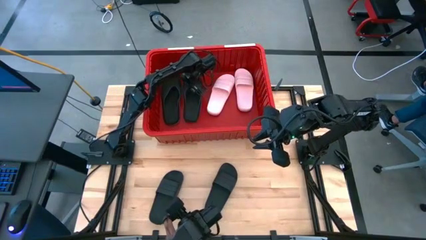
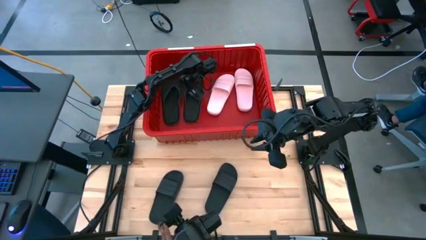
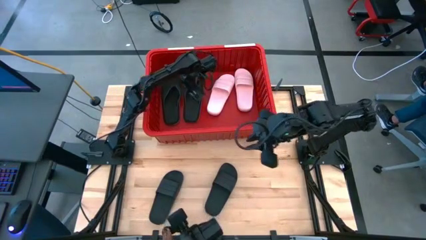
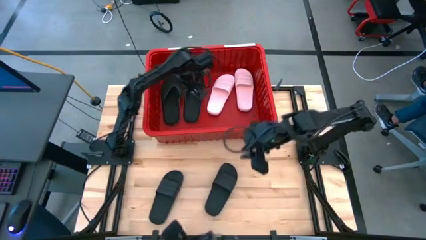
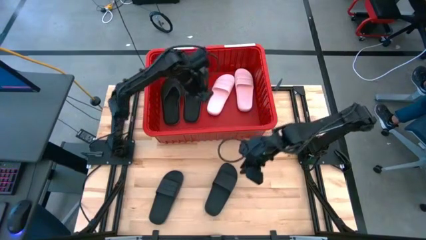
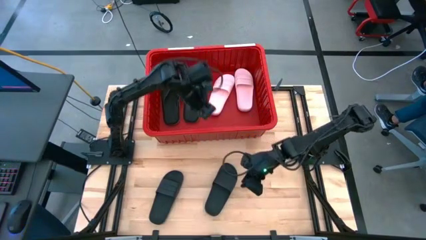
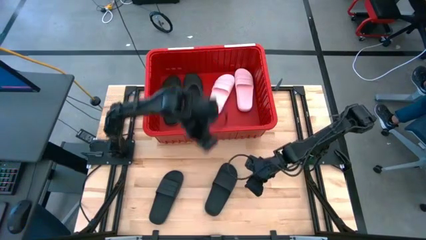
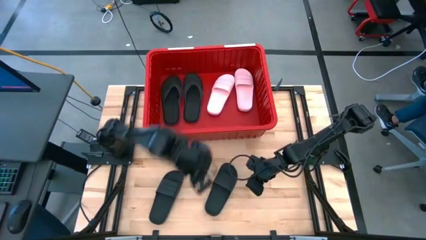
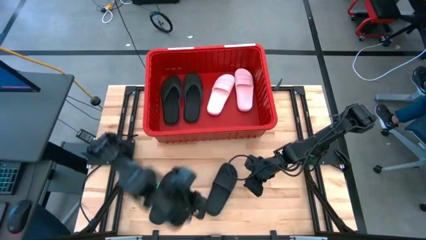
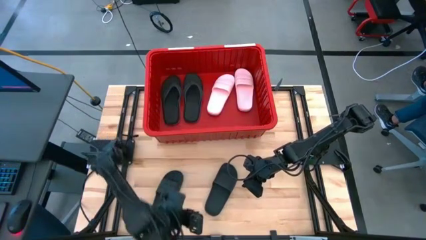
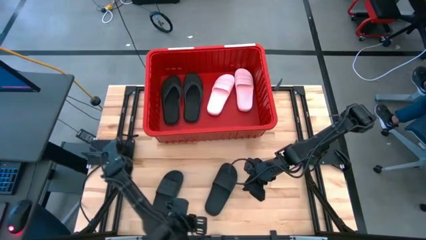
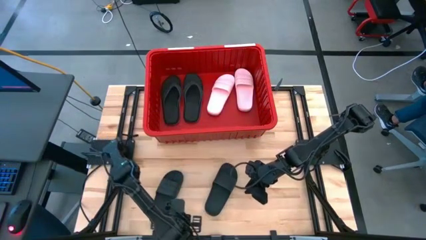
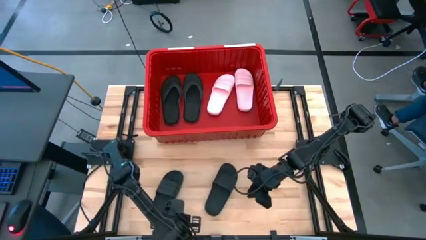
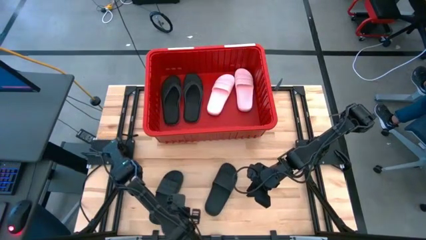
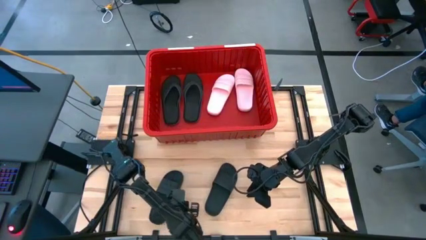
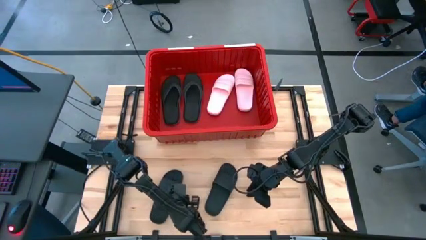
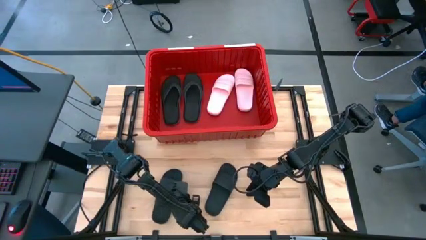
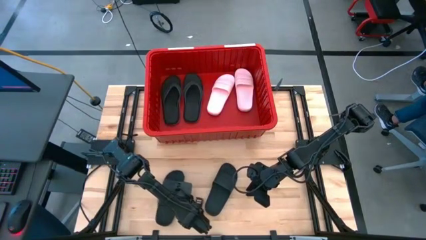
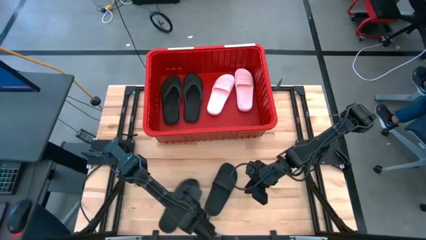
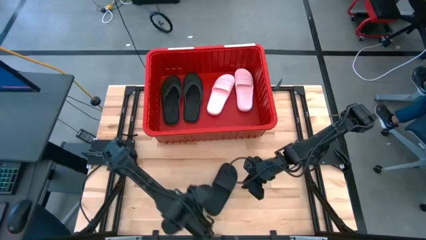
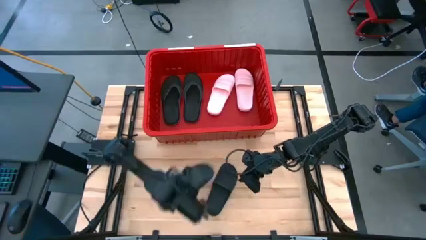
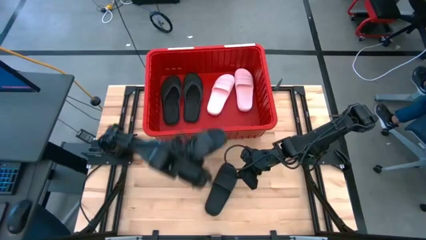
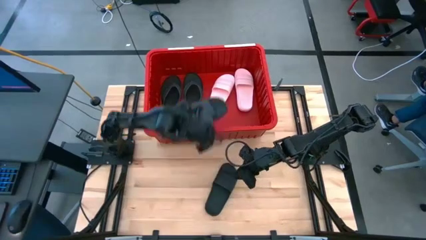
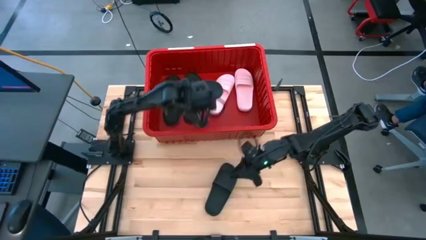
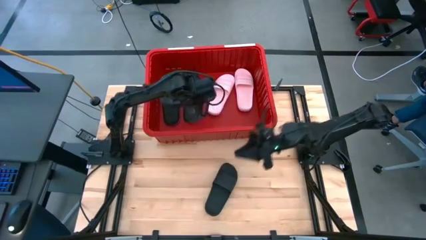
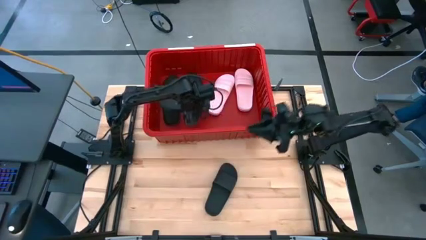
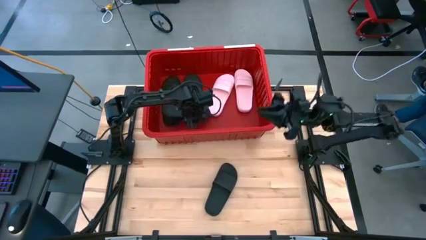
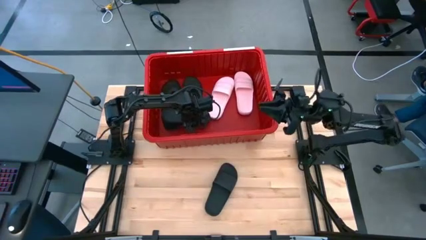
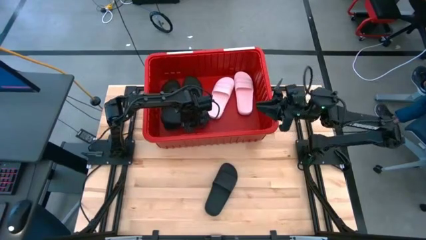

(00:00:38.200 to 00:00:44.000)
Task: Pick and place slides into bin
Put the left black slipper into the red container

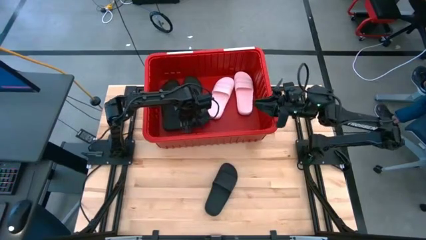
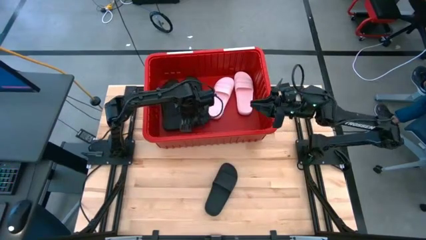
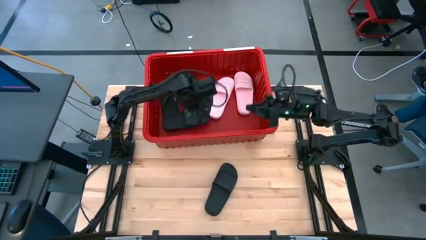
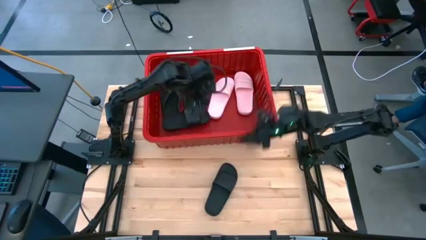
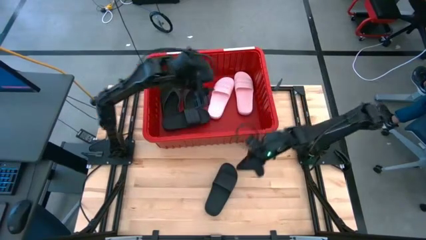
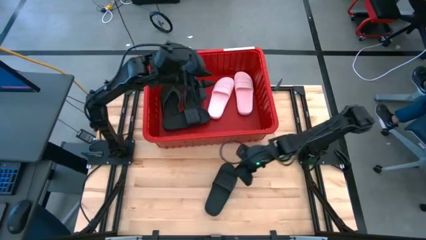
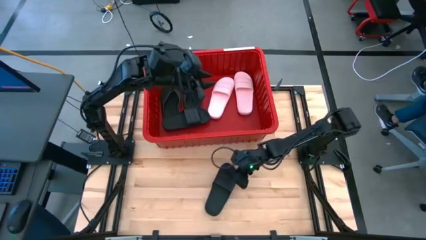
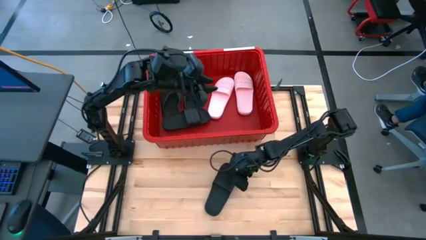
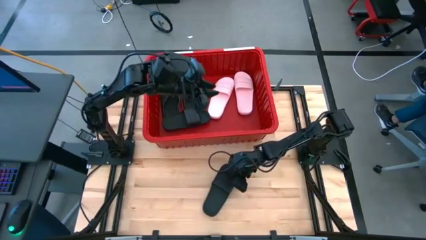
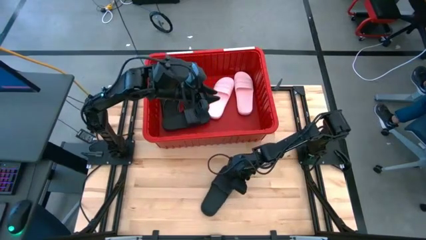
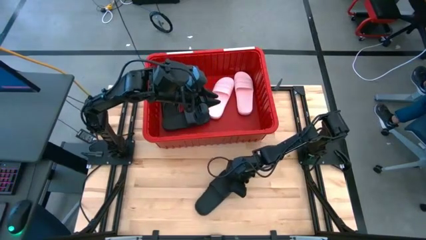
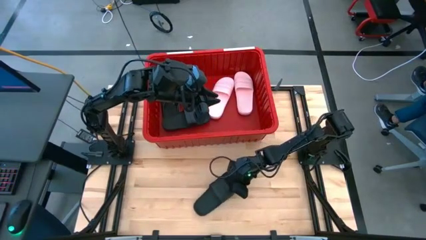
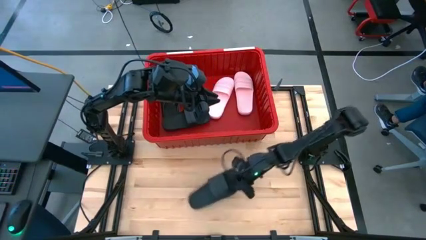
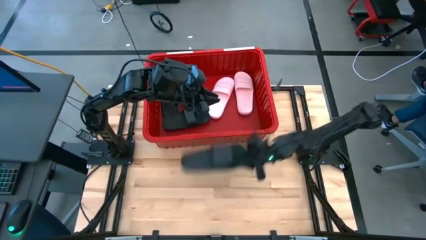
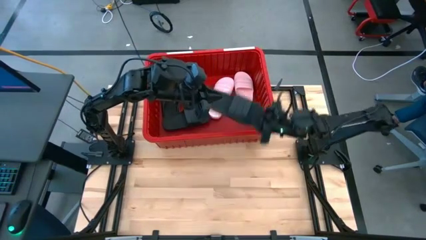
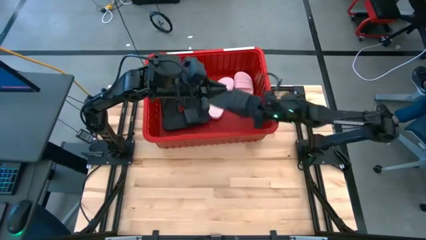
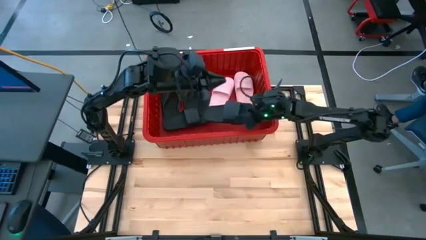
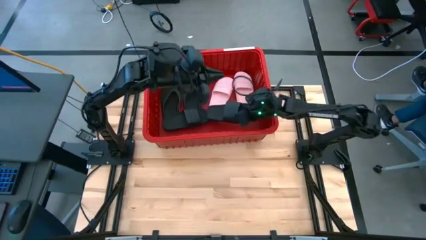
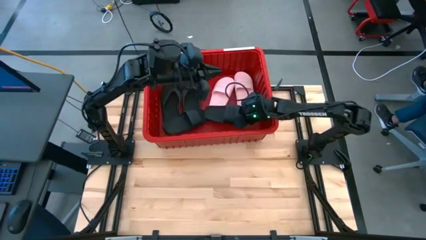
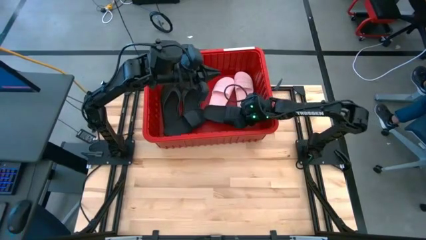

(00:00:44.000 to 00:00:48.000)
Put the black slipper into the red container

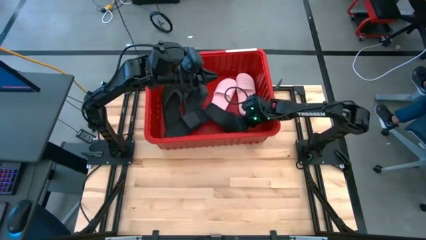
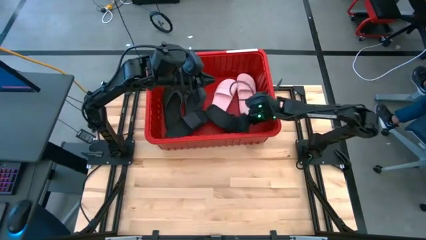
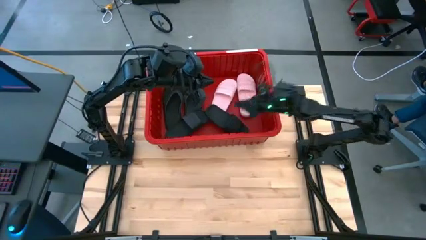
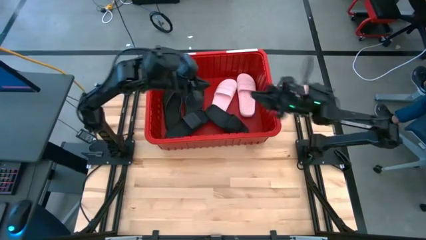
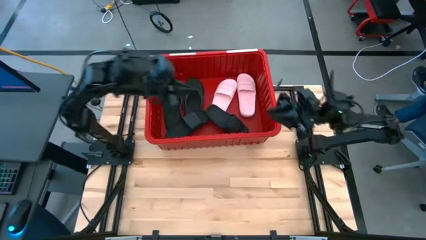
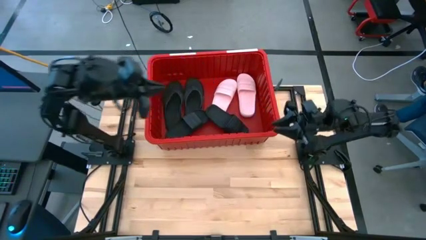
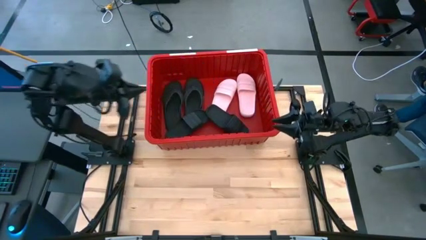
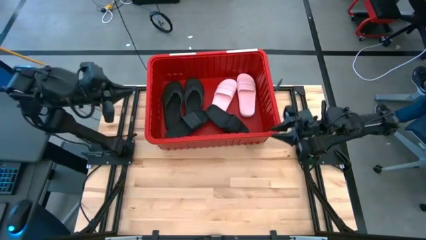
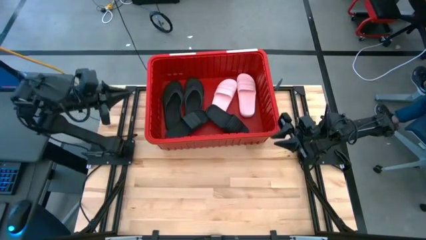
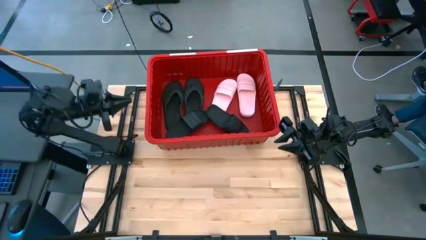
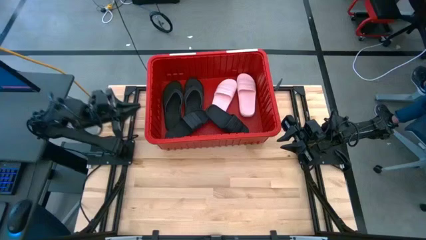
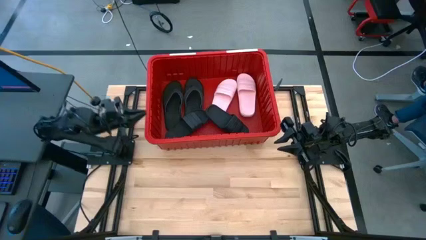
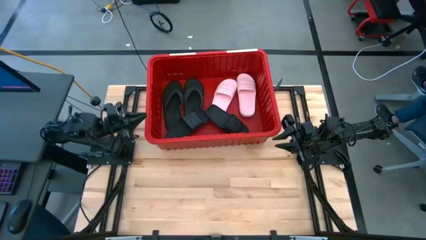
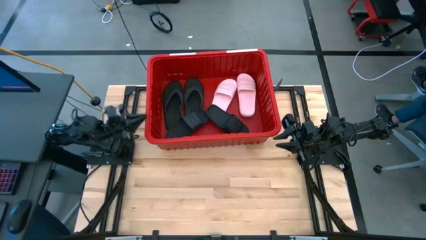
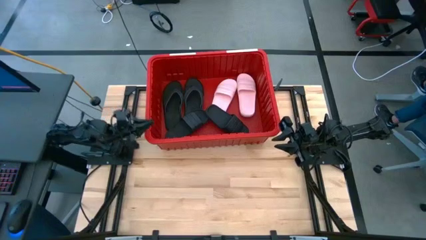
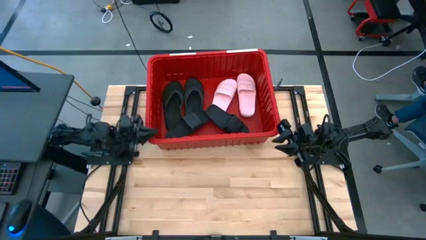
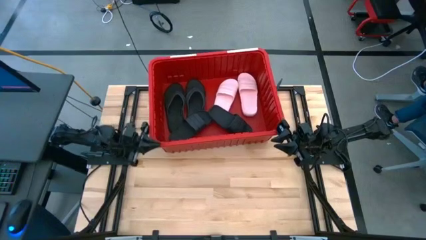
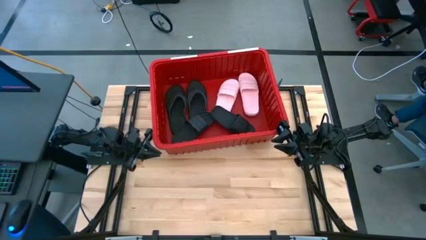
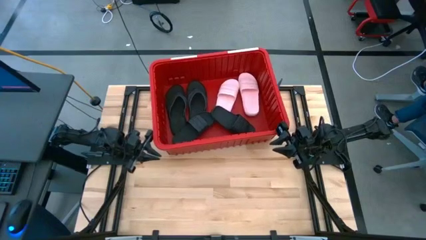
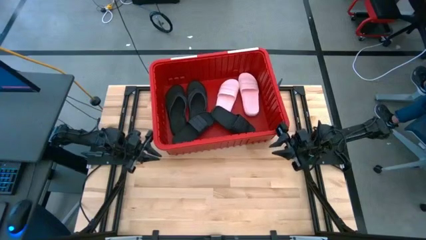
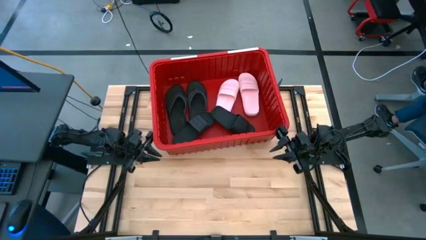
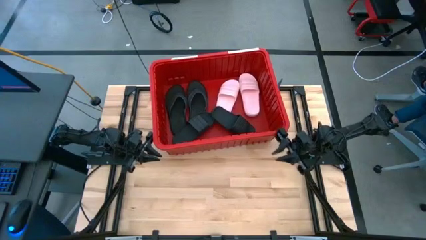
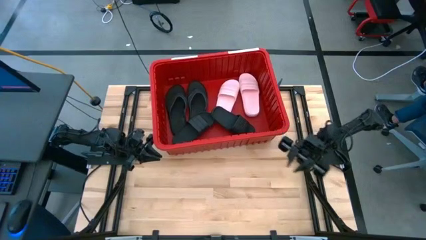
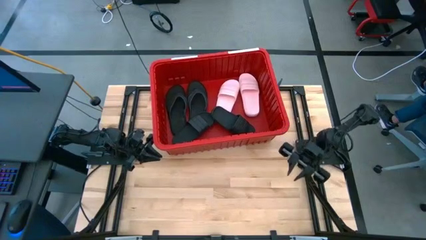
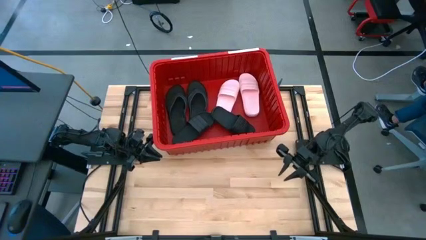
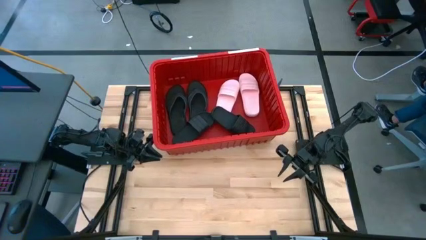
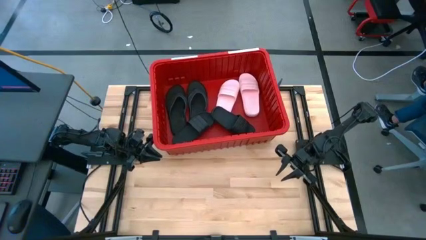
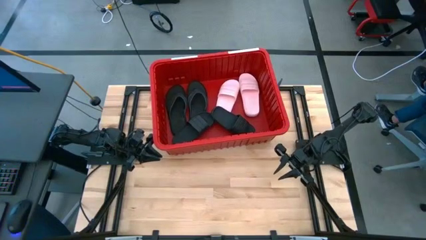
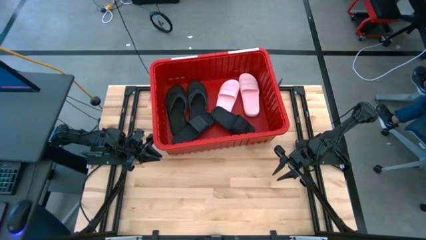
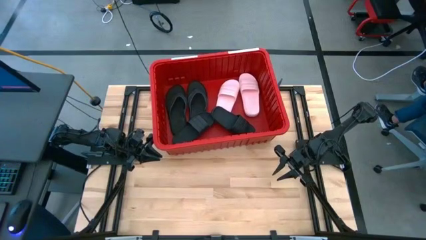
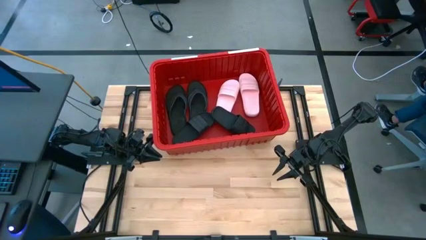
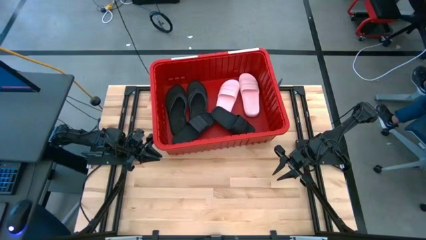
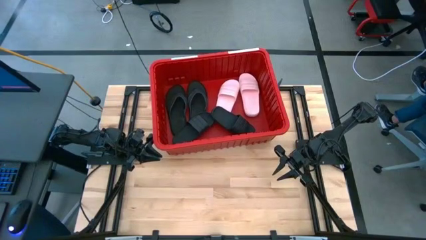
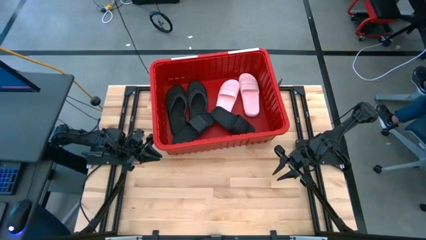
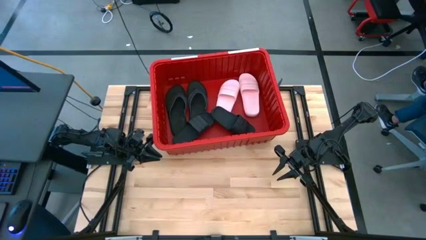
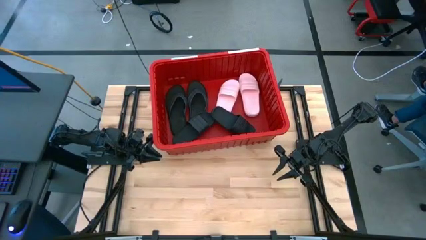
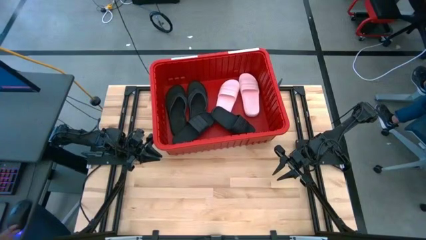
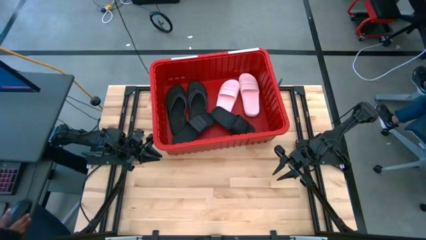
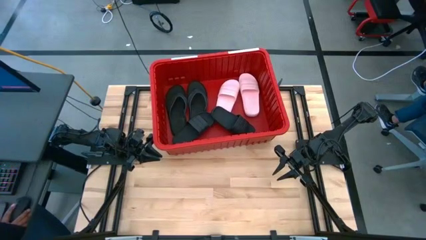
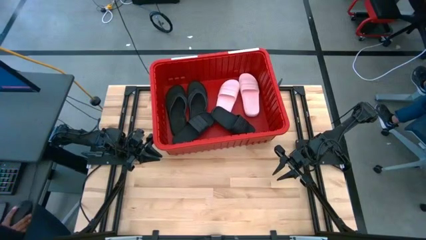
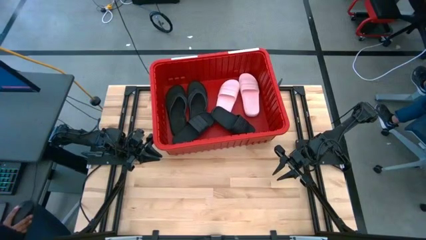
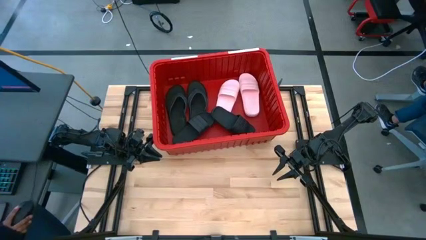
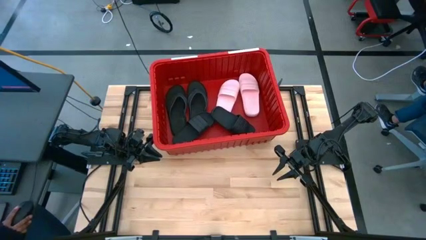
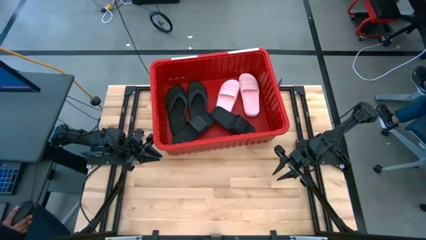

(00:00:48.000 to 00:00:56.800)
Return to Home Position
